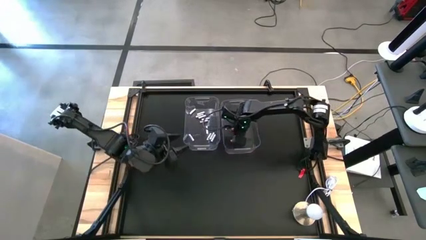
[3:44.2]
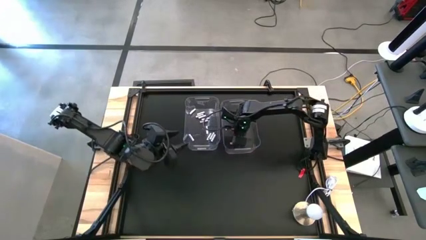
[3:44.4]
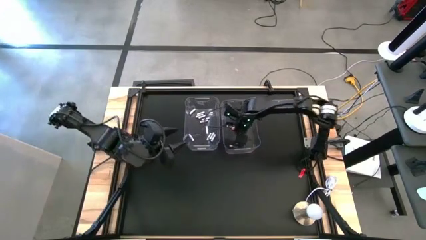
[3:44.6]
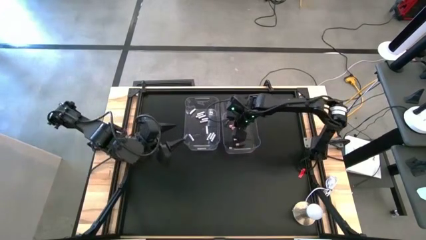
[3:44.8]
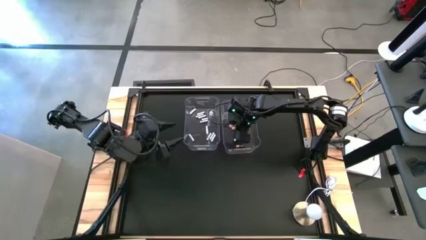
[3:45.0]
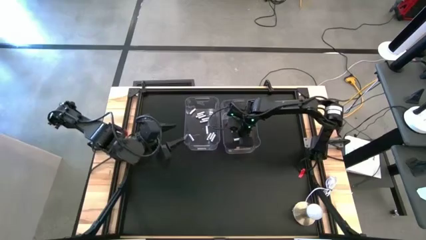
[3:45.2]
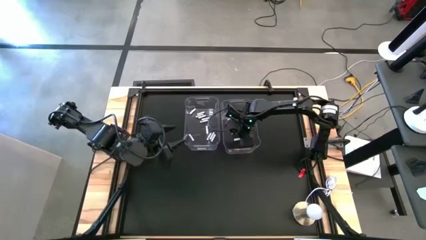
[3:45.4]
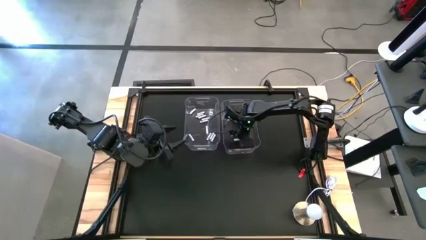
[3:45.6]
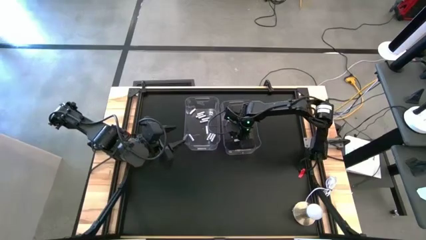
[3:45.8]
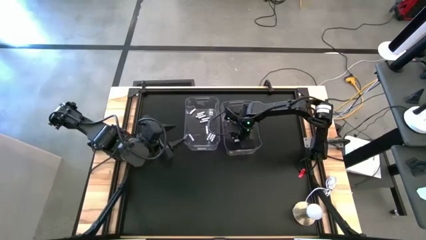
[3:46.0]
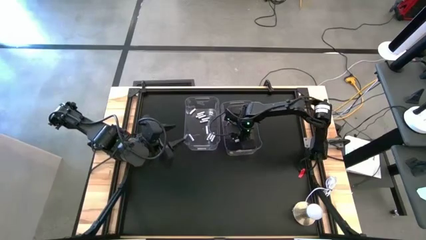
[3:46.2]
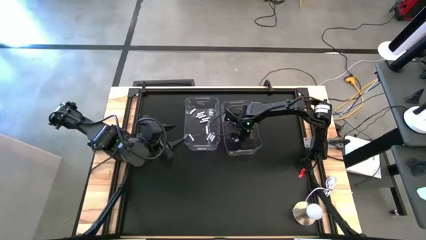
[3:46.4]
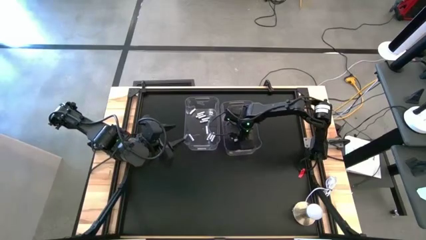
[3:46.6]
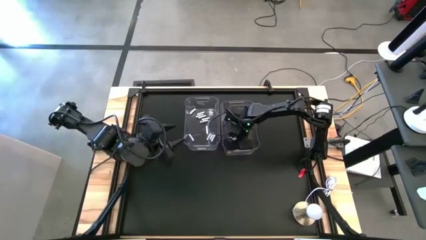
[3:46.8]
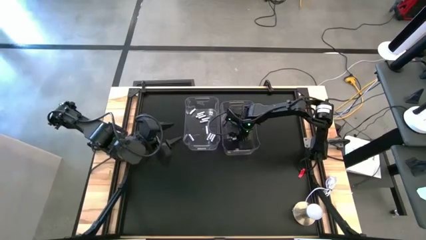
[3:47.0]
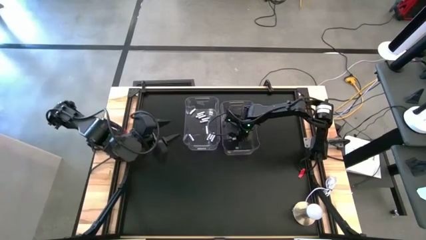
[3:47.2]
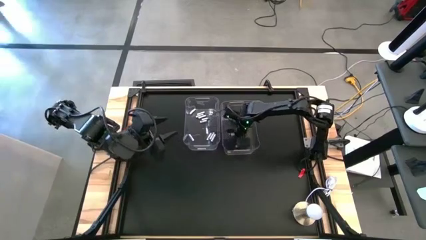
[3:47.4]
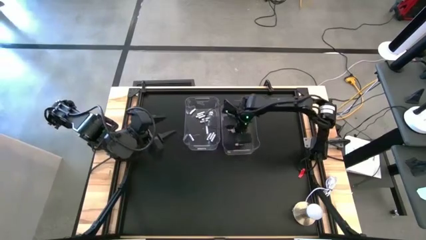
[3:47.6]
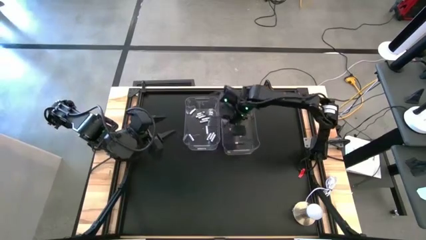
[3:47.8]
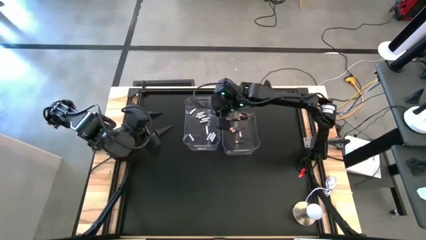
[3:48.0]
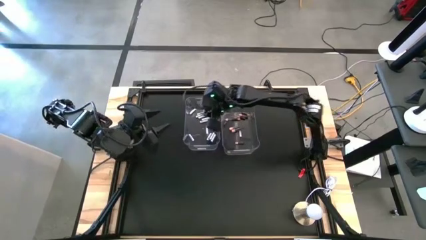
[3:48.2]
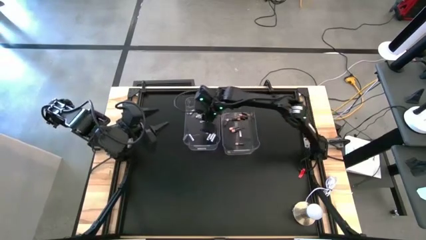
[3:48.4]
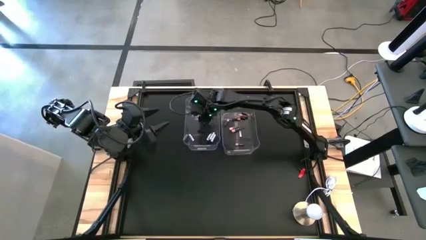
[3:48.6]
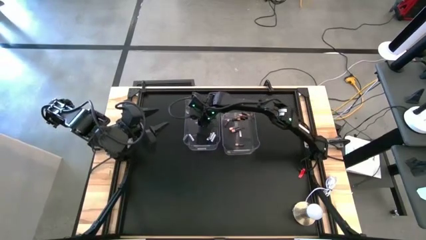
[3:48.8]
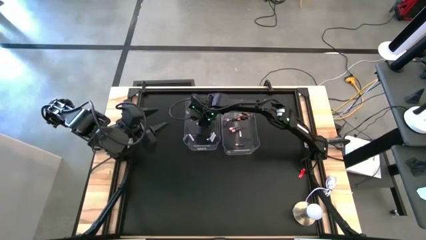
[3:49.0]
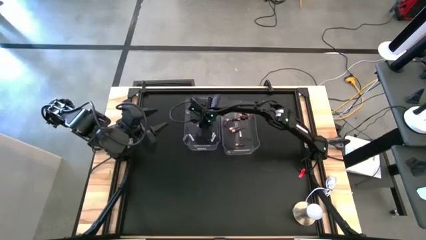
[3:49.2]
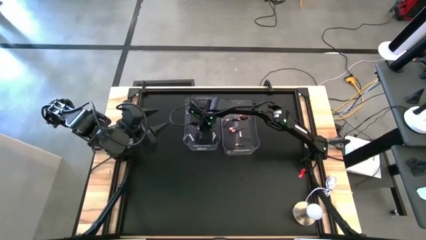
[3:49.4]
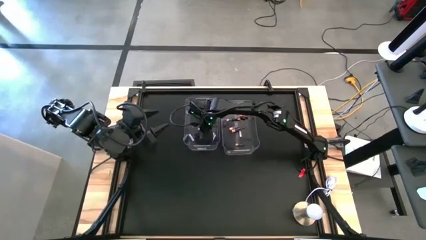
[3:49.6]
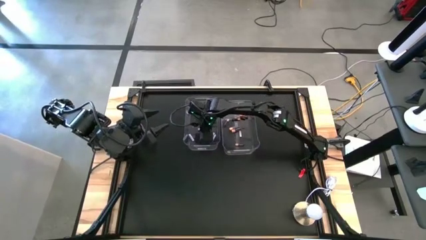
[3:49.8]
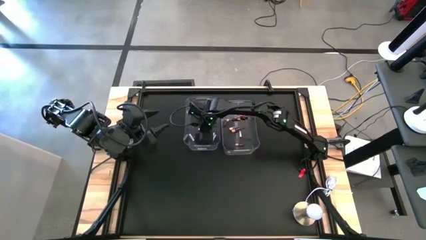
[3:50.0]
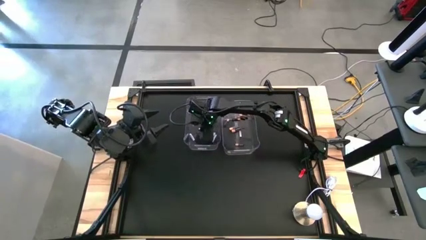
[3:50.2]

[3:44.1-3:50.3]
Task: Sort batteries
Put the white battery into the left transparent bin

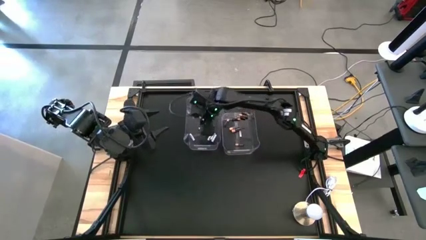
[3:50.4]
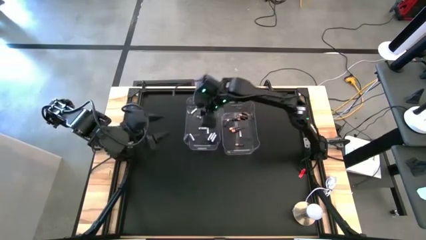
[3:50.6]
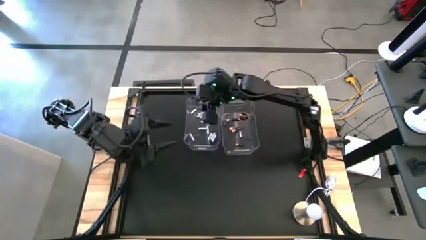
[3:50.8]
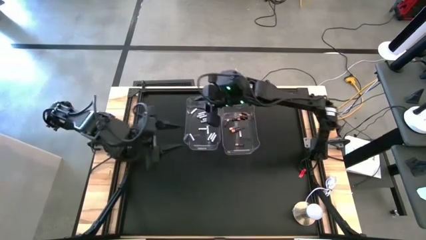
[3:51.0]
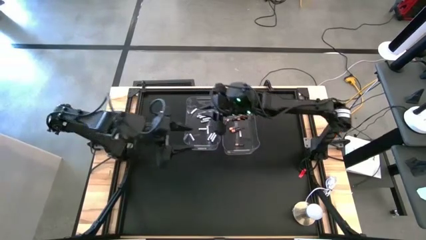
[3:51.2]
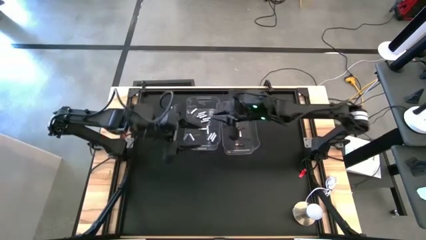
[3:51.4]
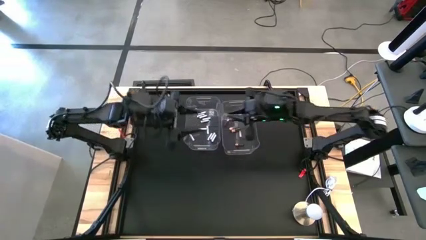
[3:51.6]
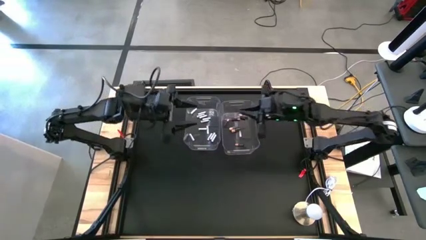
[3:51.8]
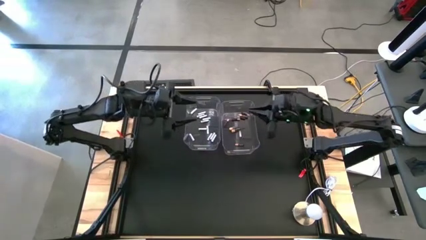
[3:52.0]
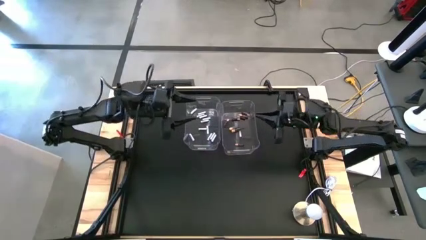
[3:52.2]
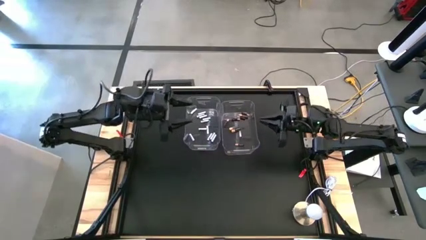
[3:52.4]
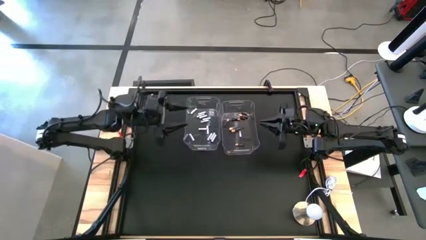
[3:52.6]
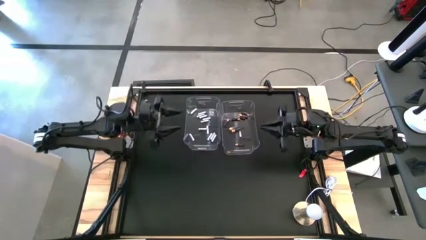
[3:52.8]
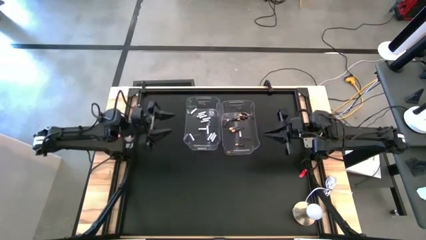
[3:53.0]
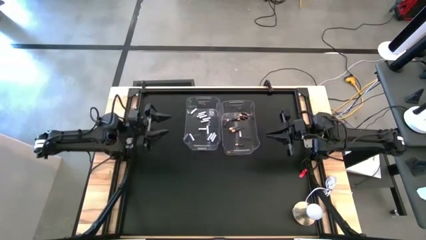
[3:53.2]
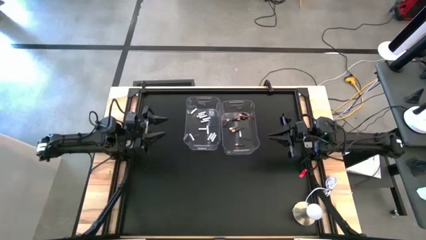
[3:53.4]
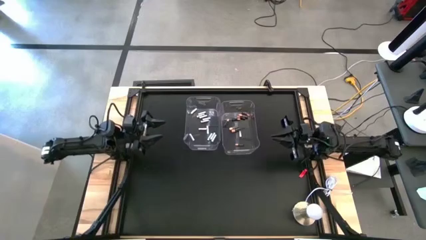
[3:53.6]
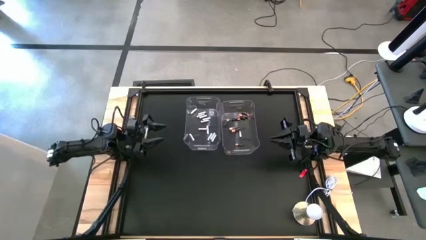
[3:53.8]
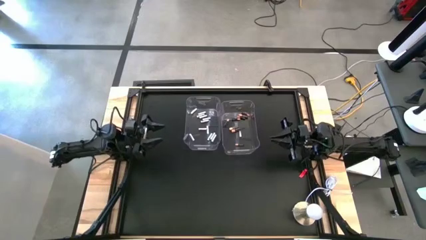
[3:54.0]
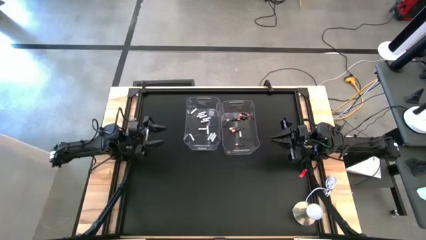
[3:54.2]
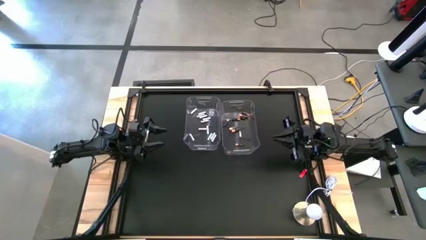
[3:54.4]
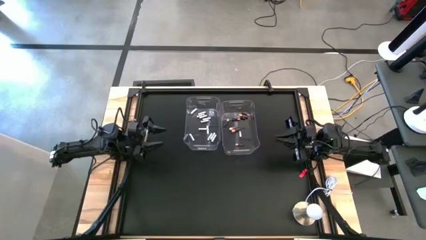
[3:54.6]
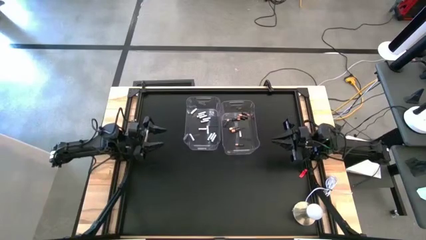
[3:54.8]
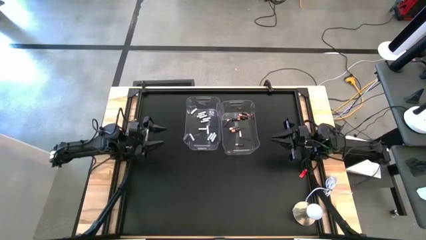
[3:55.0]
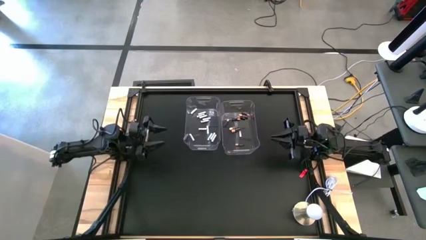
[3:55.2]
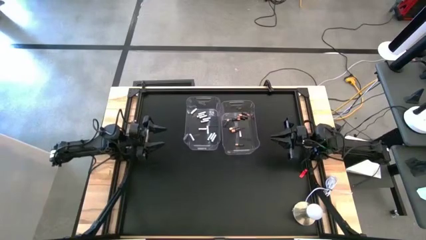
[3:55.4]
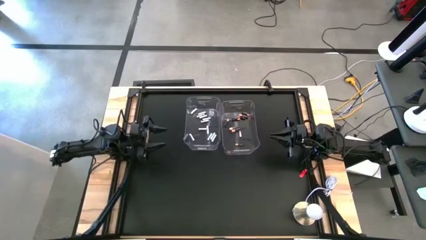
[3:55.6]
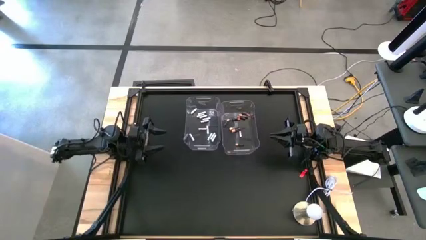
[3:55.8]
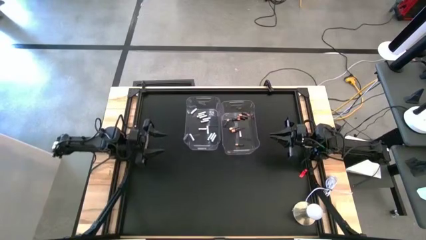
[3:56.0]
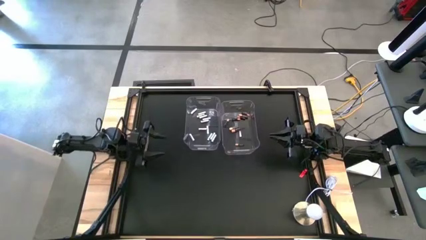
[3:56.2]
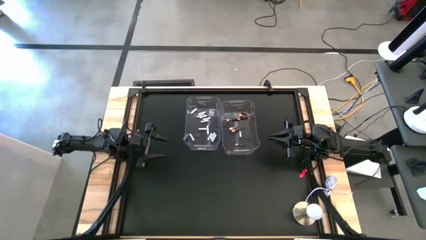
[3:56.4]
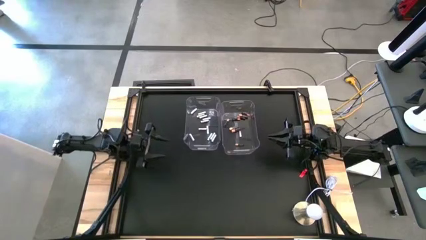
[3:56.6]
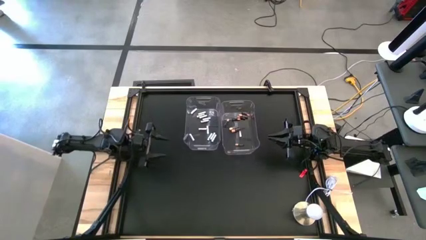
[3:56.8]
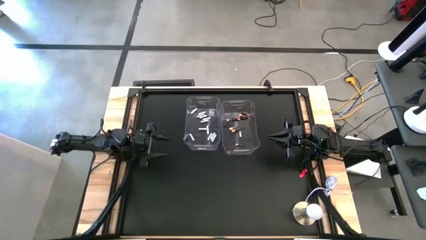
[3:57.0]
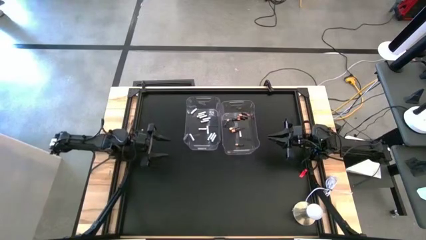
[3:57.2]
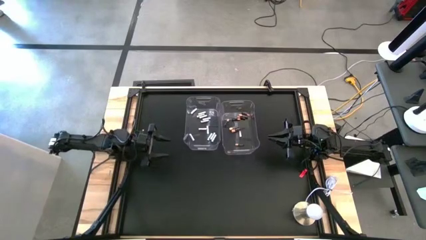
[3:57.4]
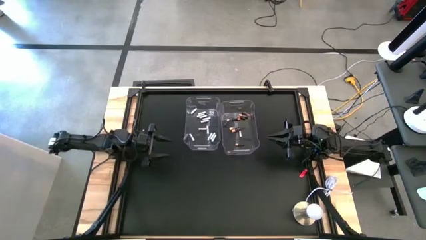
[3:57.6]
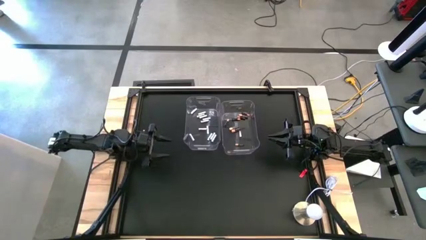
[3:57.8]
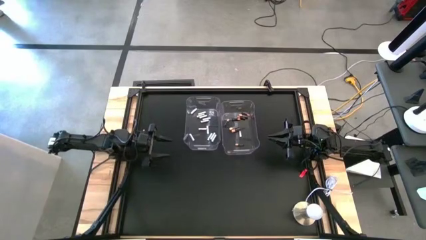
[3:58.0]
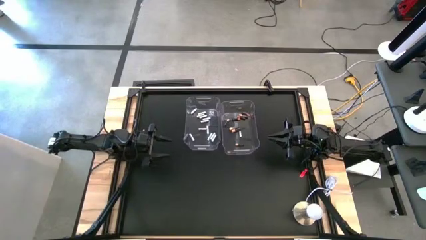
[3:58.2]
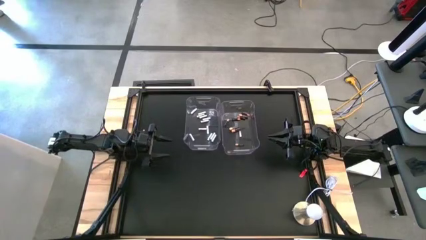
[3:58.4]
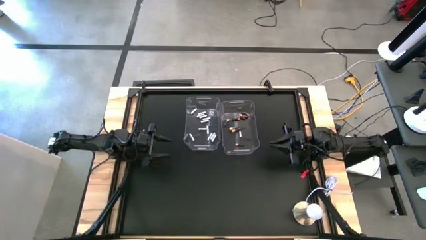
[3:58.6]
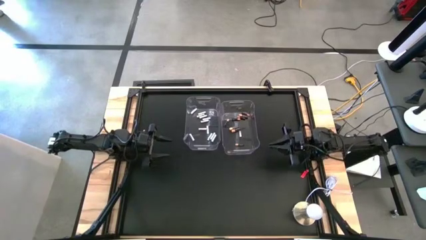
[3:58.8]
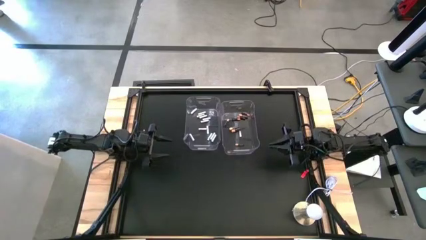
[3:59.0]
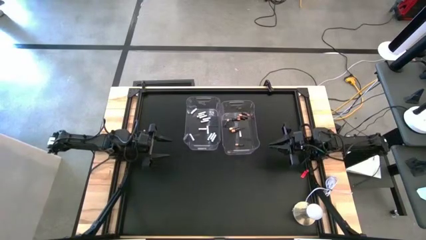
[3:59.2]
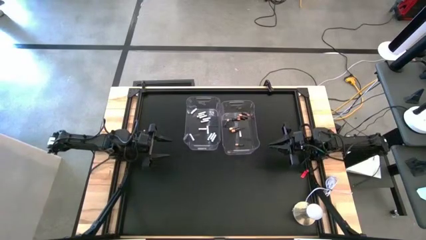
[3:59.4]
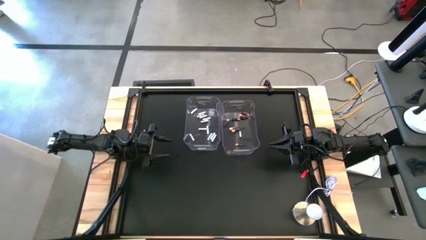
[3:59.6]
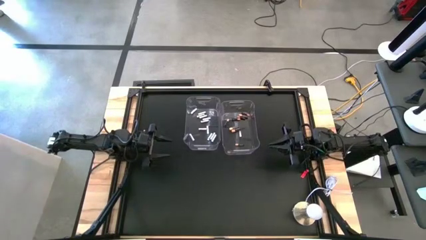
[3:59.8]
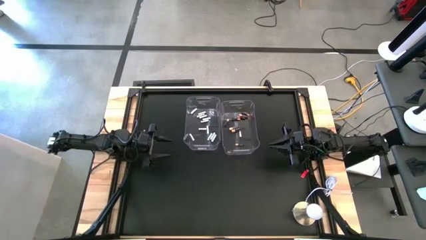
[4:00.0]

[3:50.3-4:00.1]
Return to Home Position
